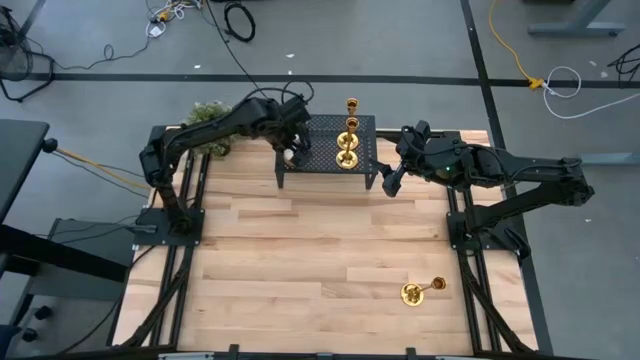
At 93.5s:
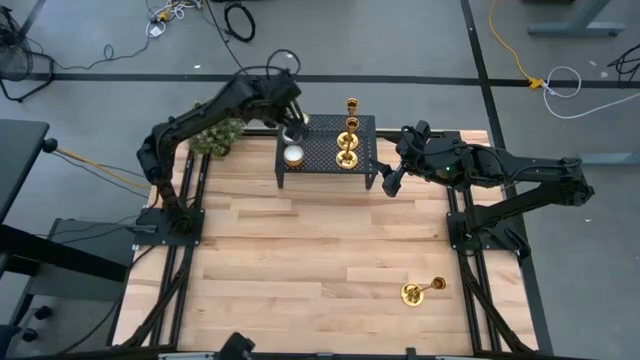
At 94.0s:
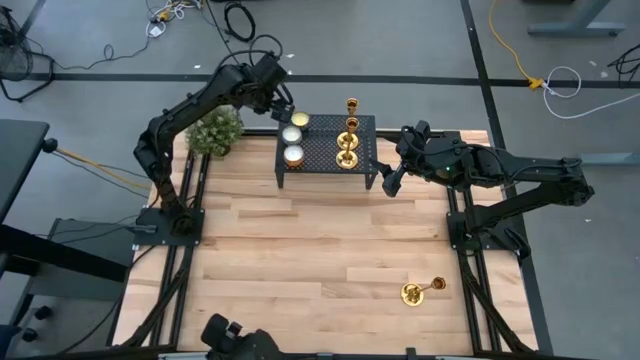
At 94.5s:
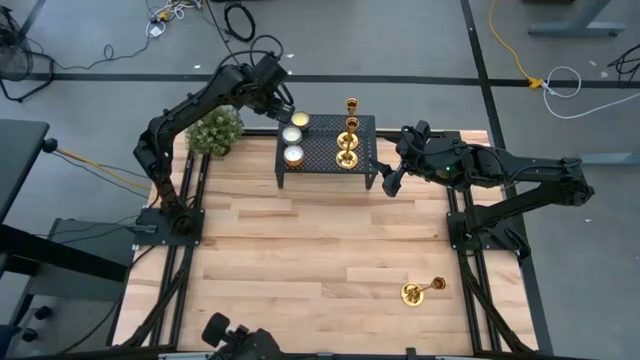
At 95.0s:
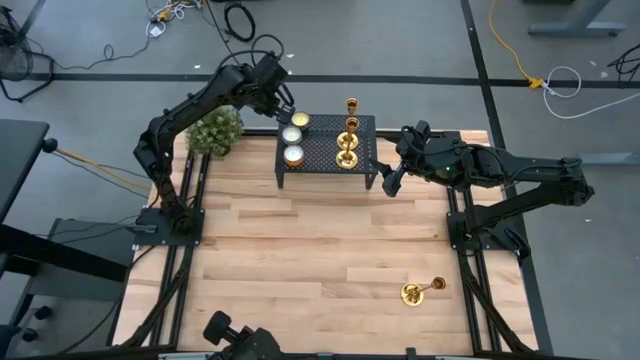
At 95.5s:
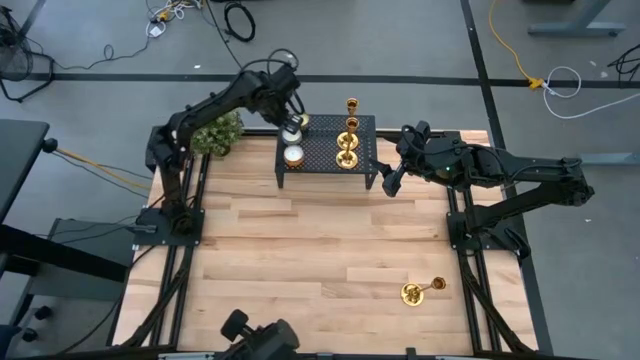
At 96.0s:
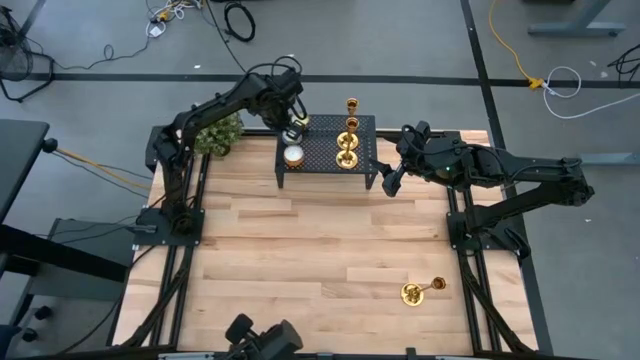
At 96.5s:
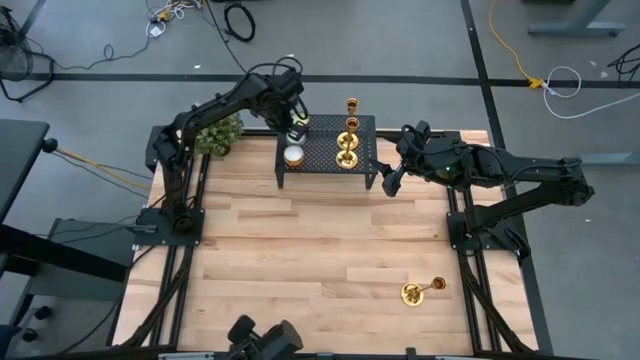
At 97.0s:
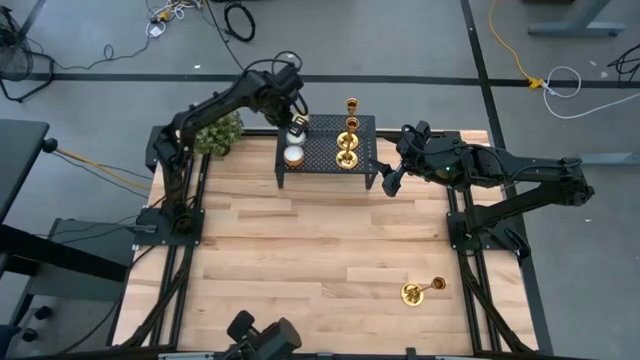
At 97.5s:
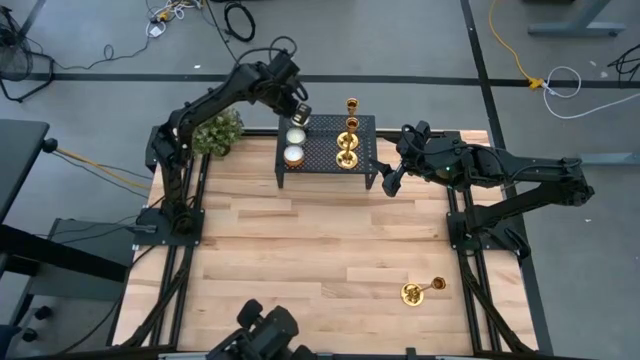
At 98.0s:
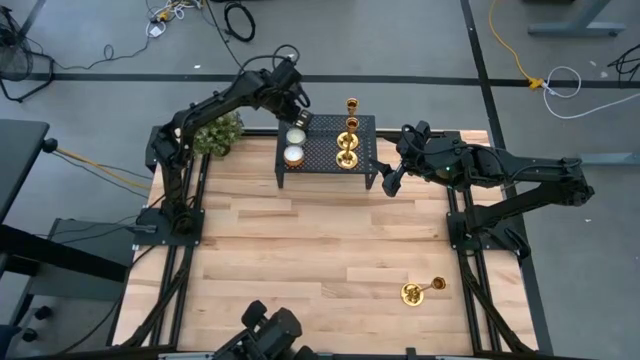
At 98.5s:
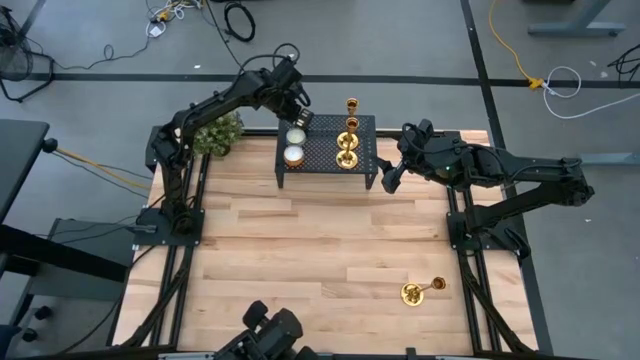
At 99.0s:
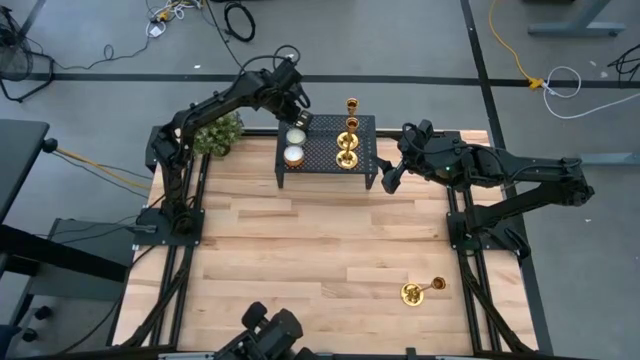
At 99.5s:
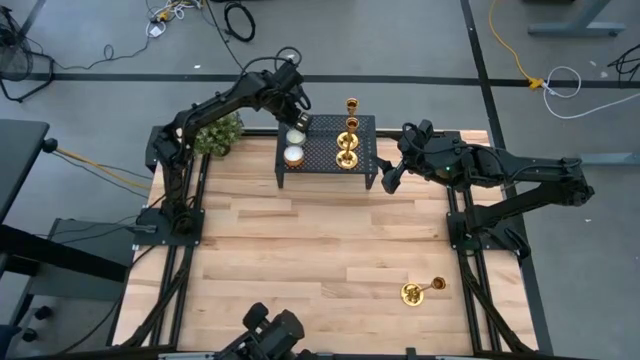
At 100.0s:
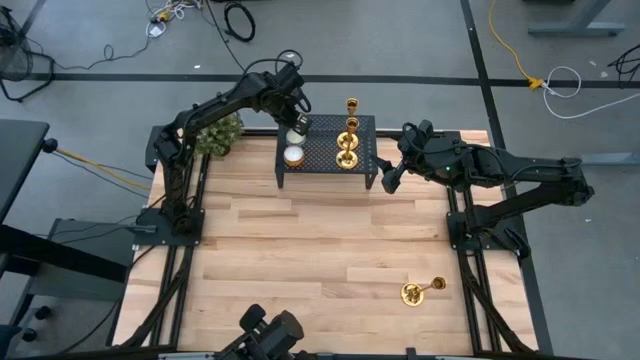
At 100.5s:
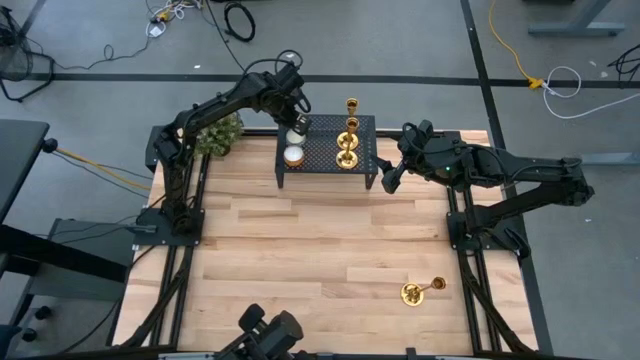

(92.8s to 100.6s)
Task: Pick & Place candle stick holders
Adjust the scented candles on the shelf

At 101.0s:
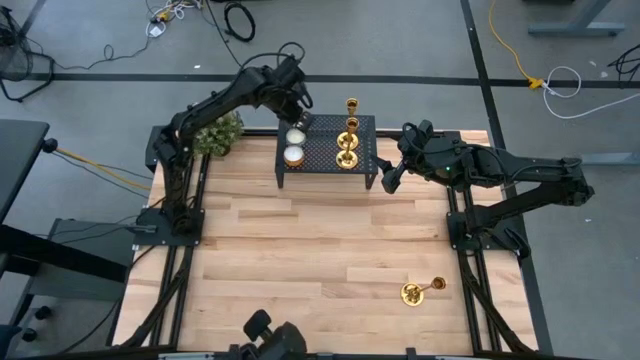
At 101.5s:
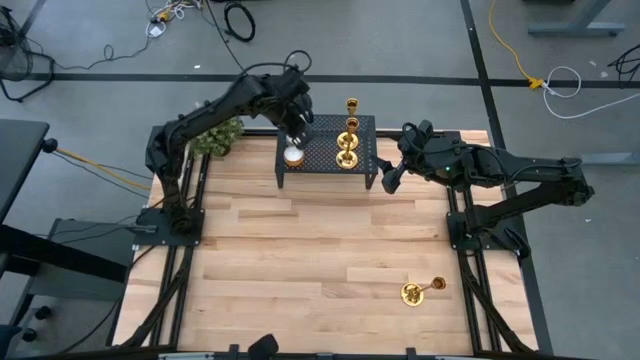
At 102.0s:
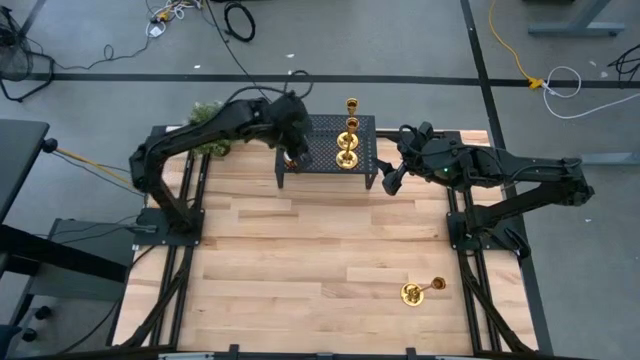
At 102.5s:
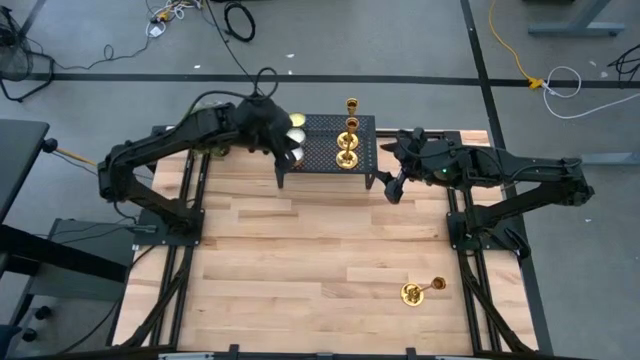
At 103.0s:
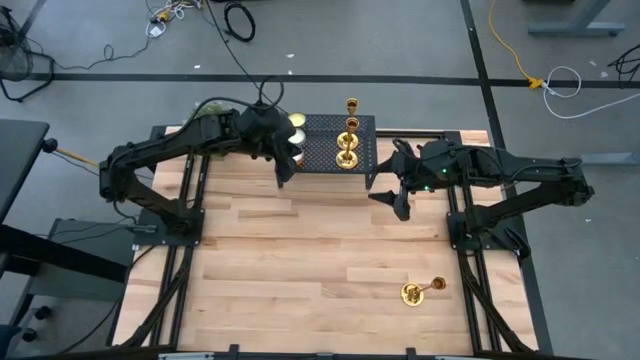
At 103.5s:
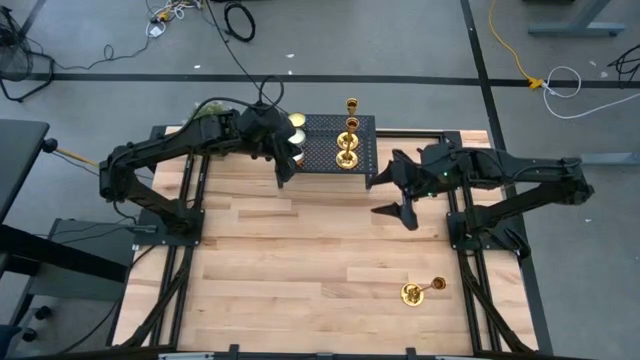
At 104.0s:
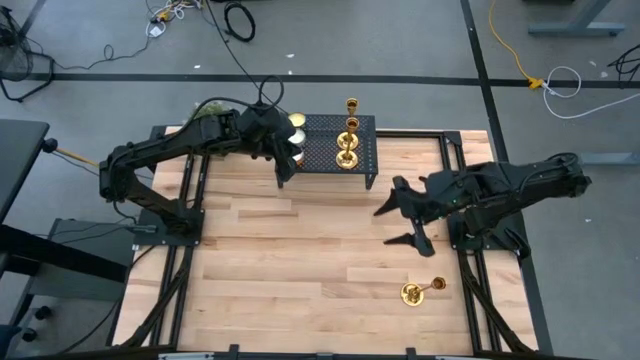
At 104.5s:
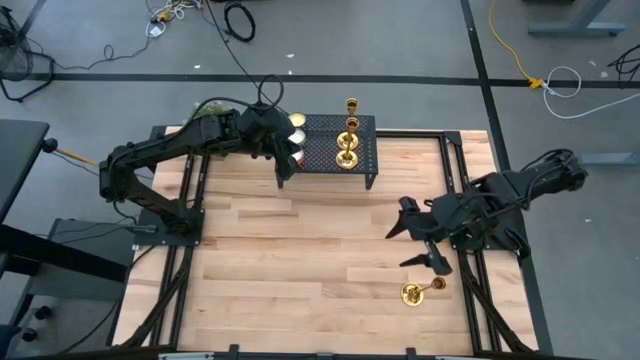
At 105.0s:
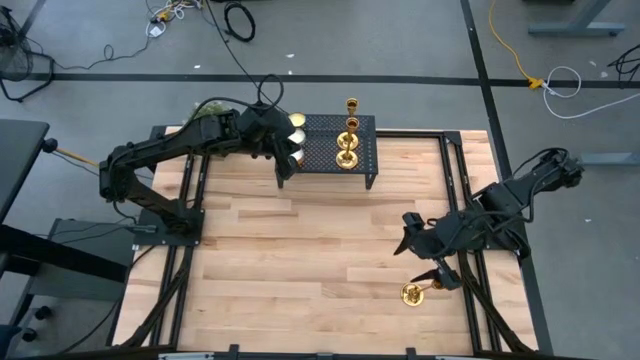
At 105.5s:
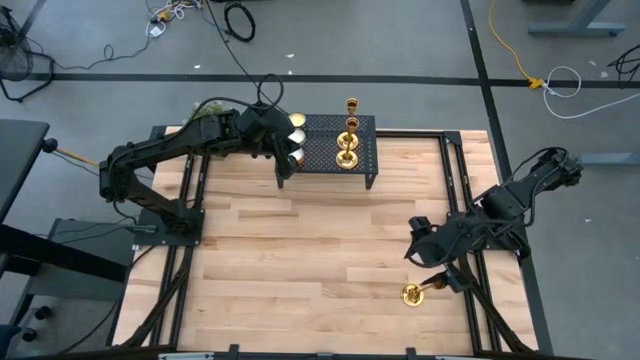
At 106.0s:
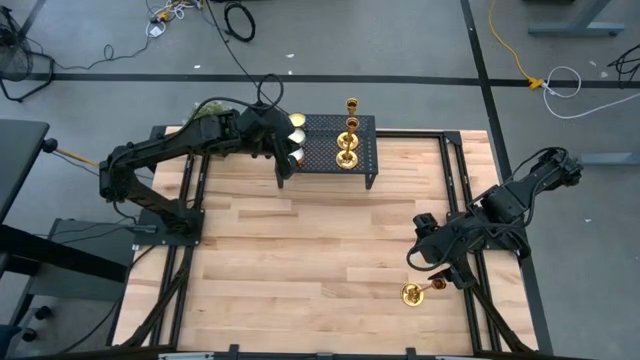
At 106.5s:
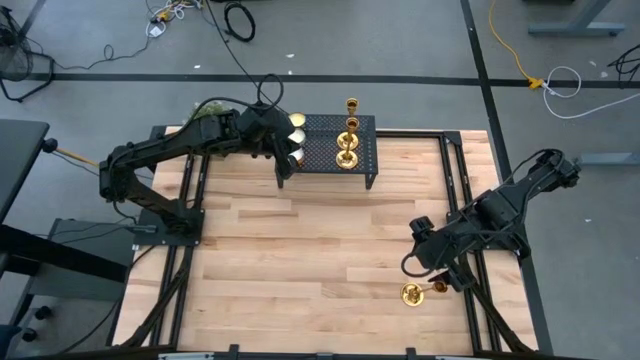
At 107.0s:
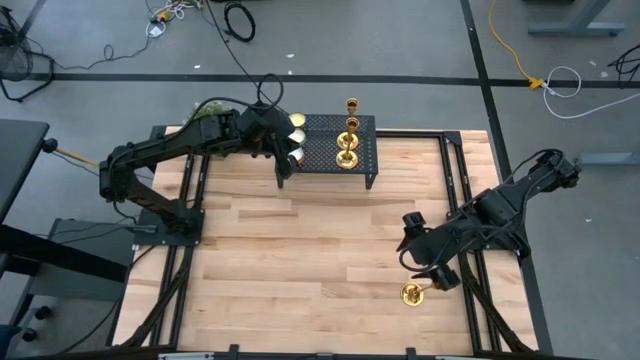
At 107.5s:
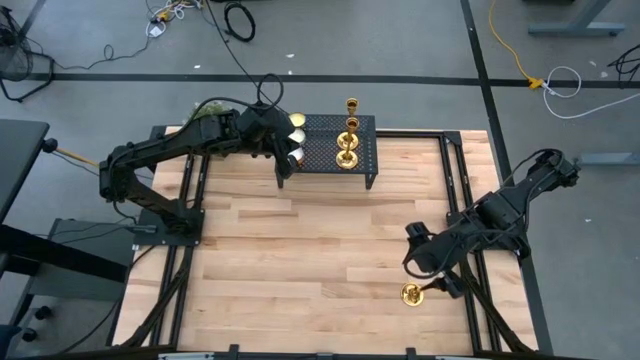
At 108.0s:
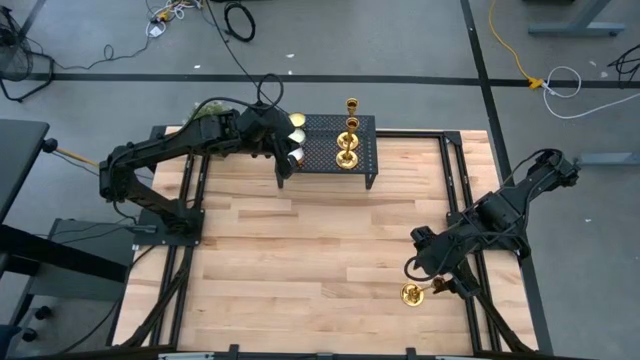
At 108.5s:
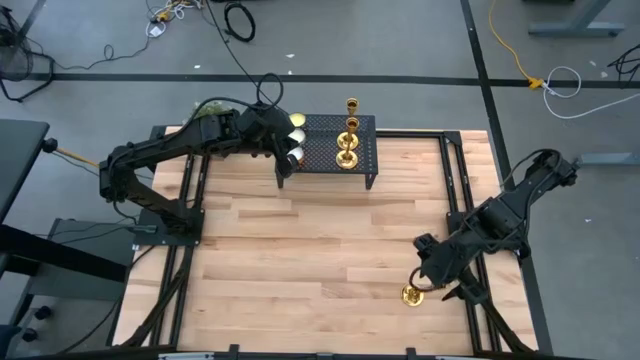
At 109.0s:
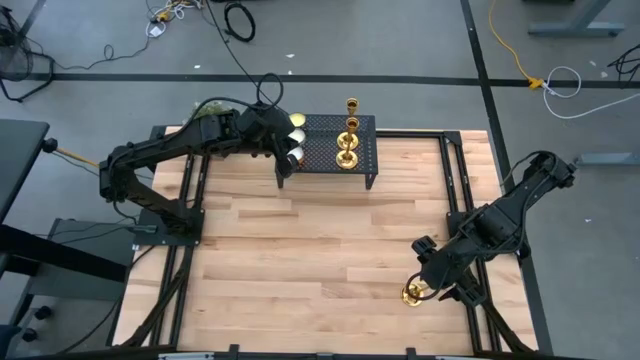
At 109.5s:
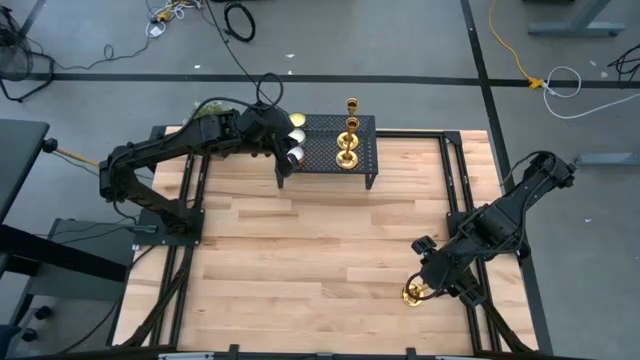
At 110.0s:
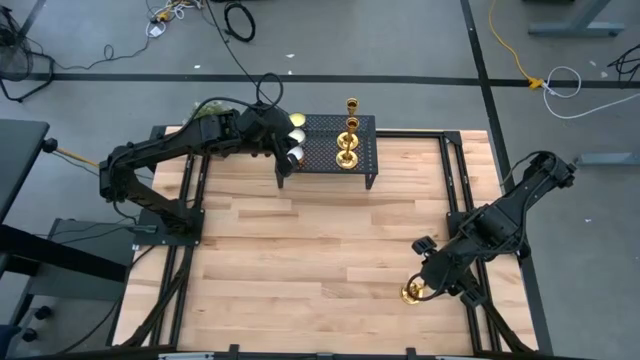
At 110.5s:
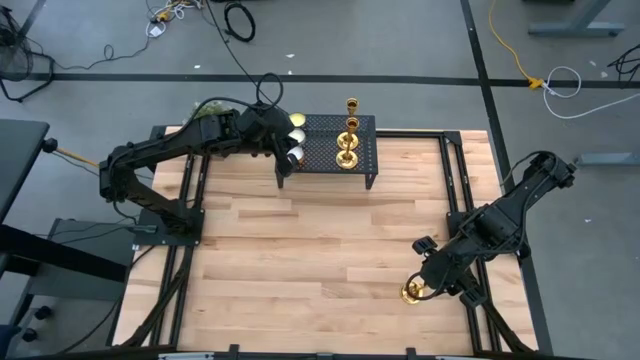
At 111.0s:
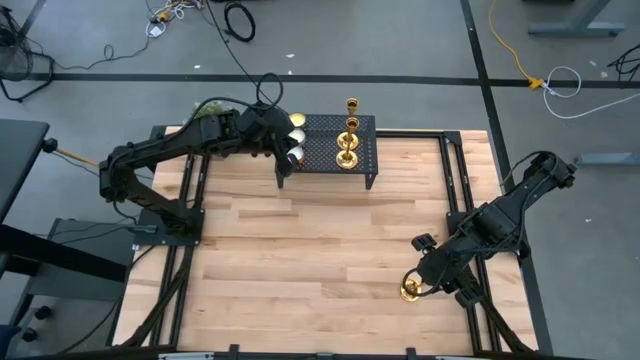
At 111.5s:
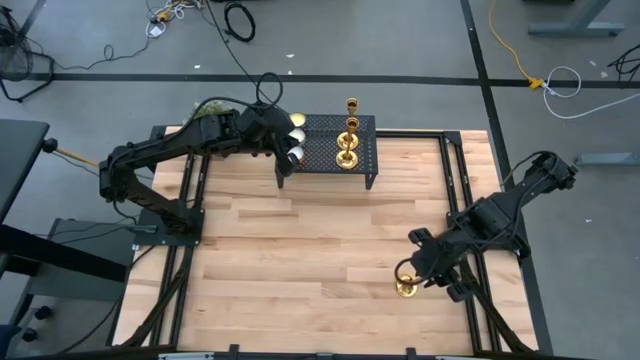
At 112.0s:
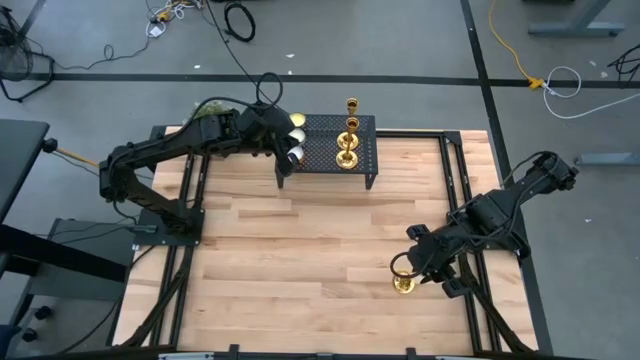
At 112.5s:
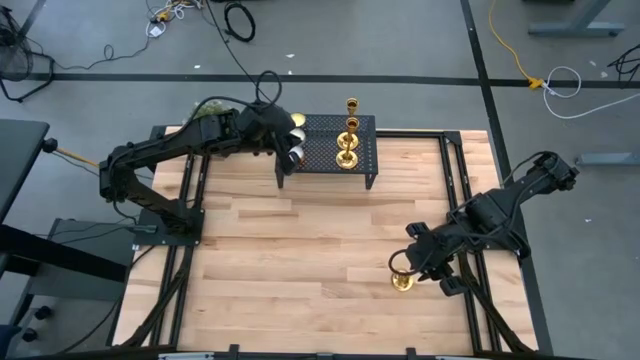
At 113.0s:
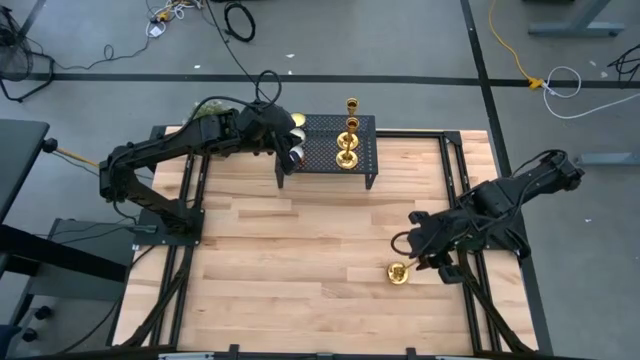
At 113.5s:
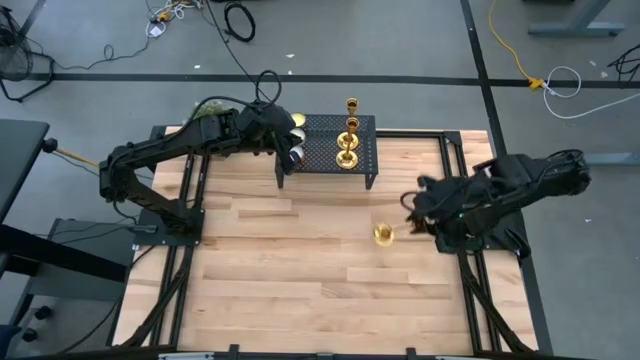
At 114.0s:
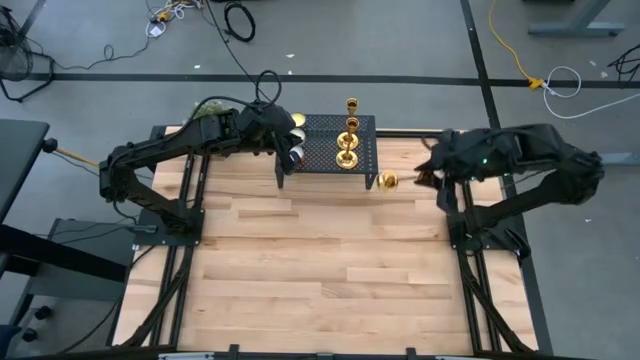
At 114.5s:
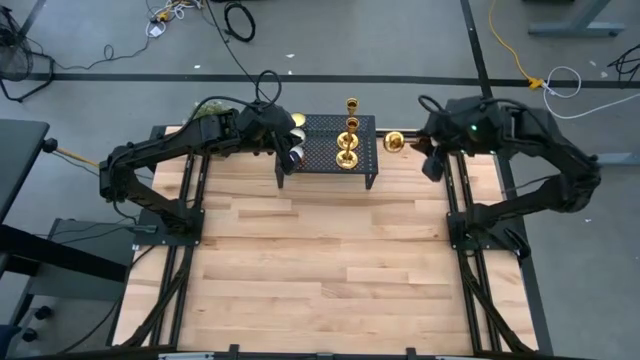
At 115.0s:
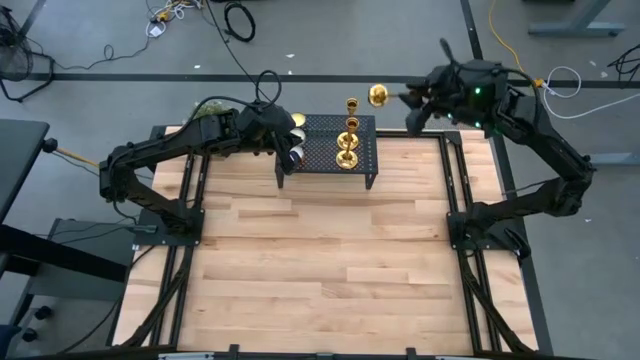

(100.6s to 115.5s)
Put the gold candle holder on the shelf aligned with the other gold candle holders
